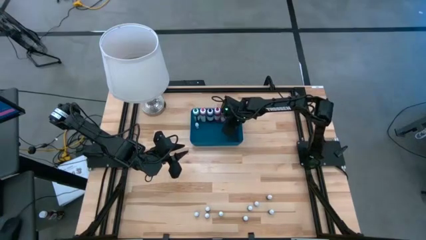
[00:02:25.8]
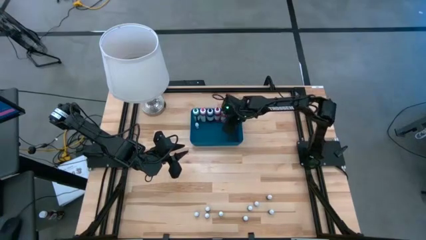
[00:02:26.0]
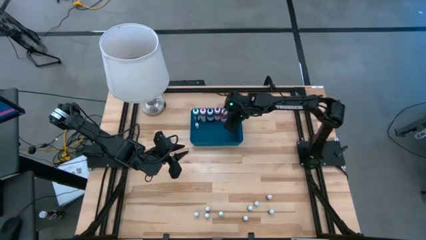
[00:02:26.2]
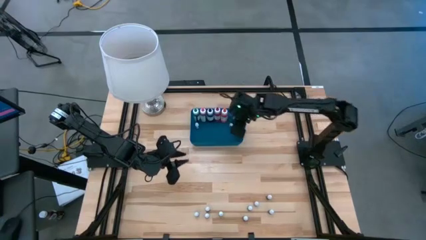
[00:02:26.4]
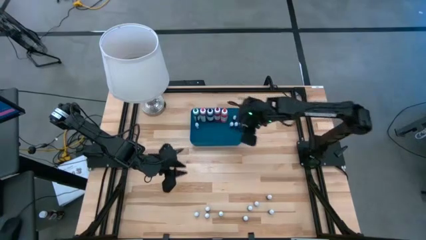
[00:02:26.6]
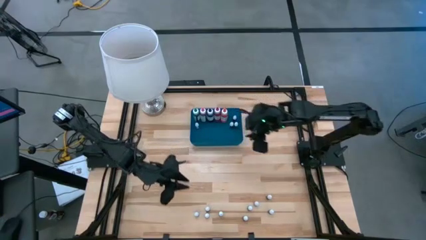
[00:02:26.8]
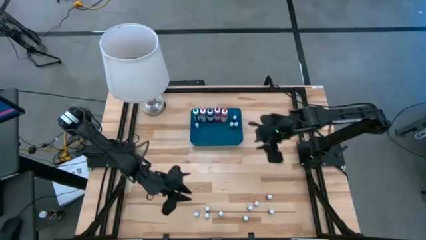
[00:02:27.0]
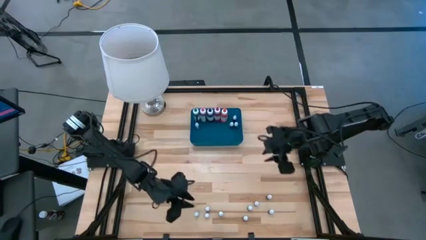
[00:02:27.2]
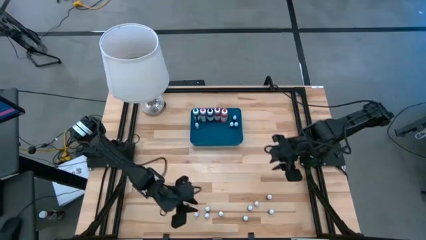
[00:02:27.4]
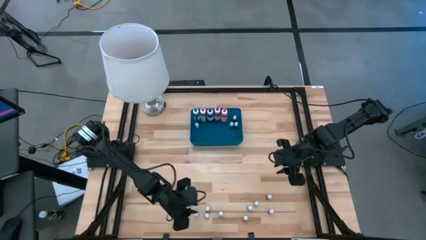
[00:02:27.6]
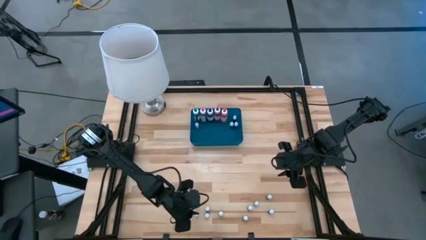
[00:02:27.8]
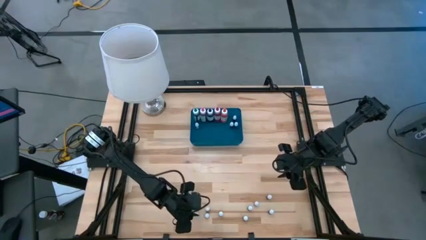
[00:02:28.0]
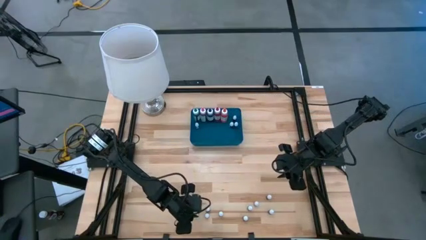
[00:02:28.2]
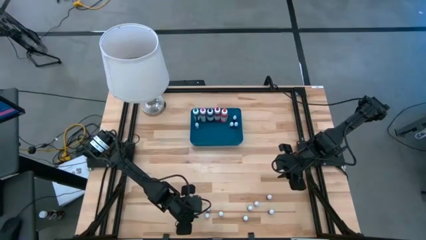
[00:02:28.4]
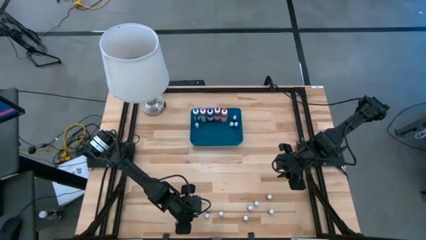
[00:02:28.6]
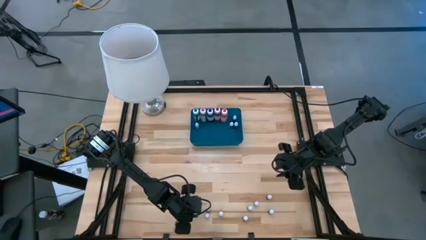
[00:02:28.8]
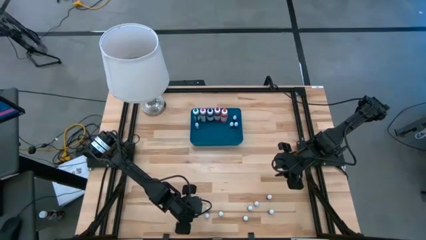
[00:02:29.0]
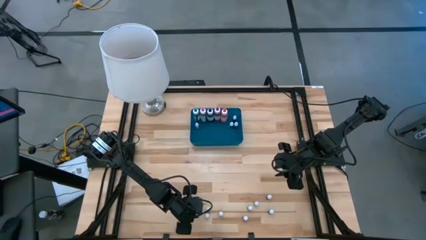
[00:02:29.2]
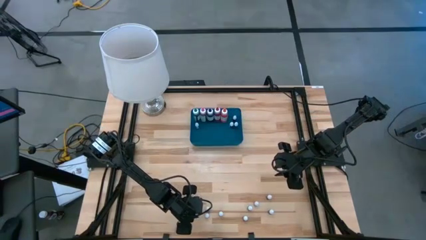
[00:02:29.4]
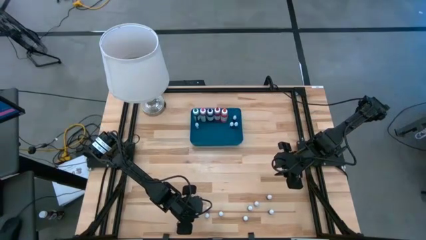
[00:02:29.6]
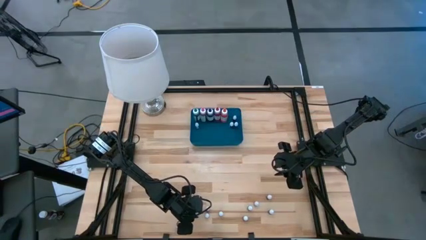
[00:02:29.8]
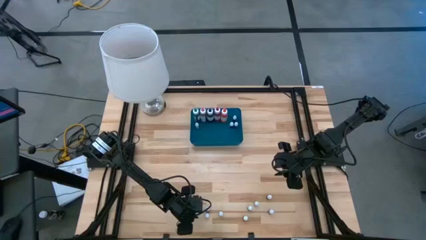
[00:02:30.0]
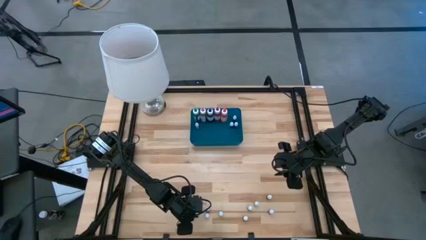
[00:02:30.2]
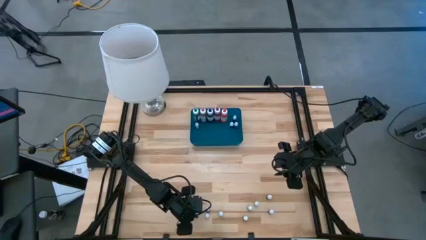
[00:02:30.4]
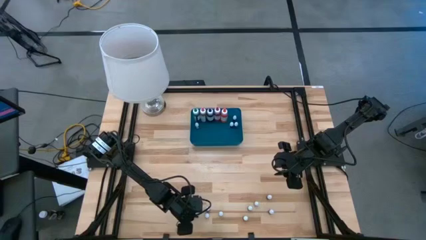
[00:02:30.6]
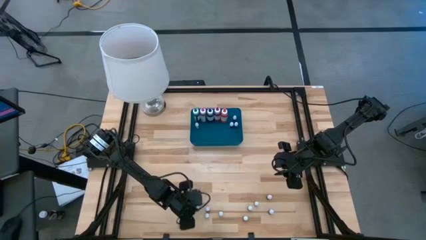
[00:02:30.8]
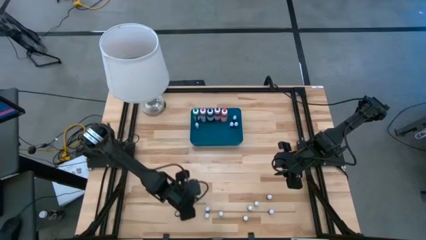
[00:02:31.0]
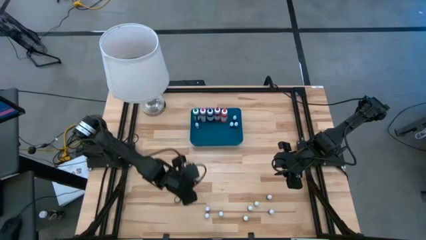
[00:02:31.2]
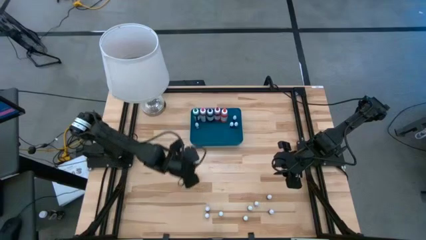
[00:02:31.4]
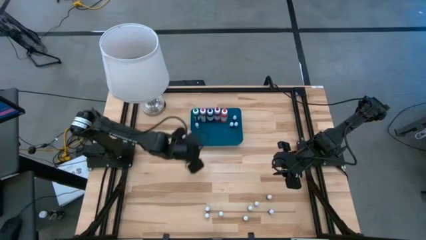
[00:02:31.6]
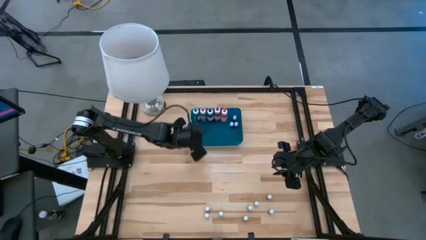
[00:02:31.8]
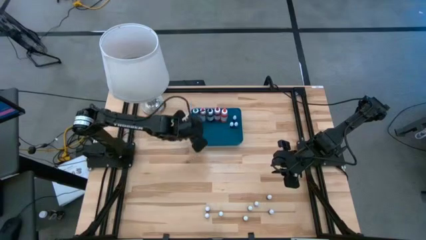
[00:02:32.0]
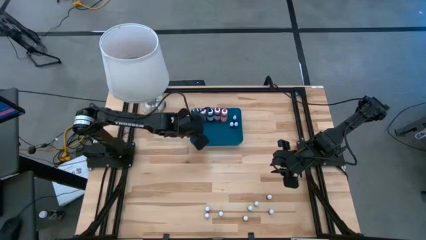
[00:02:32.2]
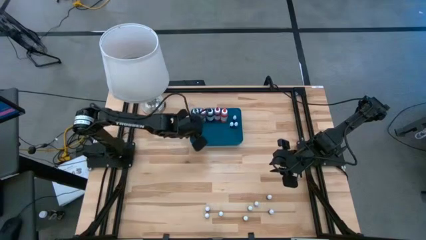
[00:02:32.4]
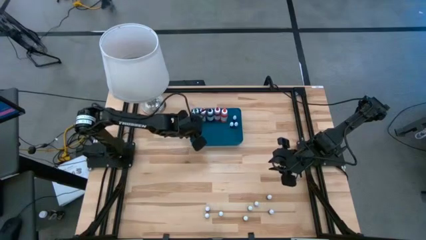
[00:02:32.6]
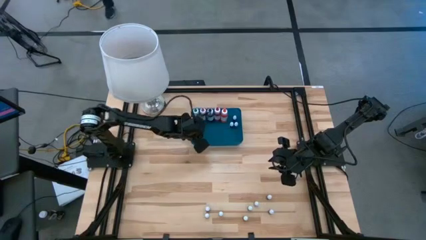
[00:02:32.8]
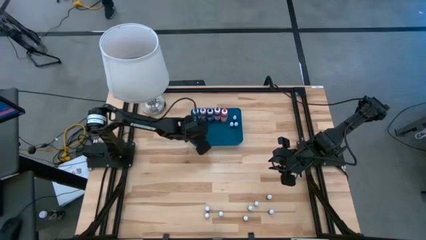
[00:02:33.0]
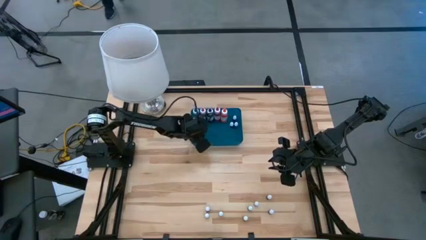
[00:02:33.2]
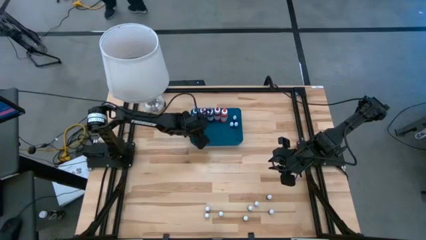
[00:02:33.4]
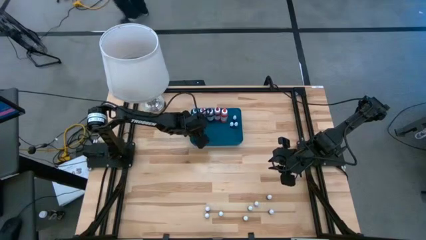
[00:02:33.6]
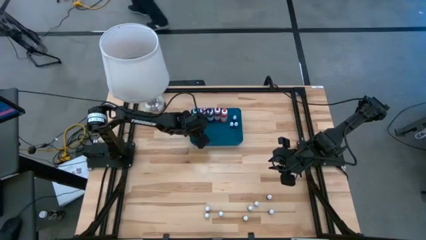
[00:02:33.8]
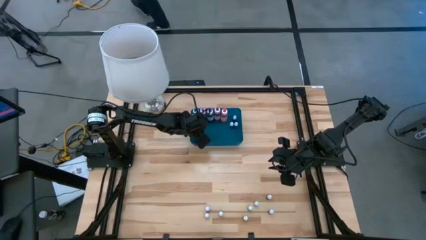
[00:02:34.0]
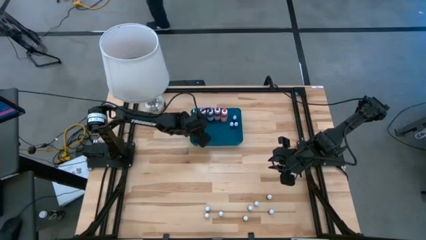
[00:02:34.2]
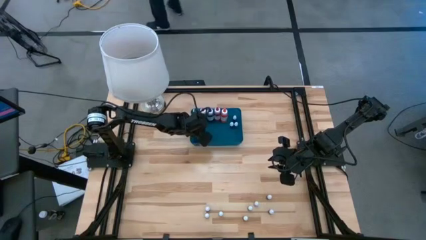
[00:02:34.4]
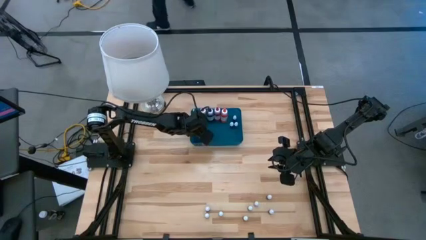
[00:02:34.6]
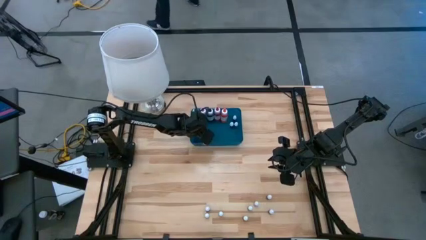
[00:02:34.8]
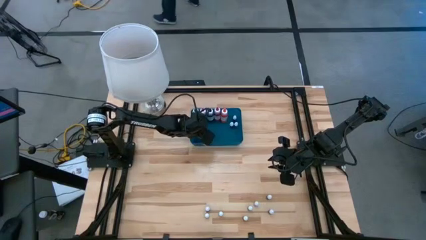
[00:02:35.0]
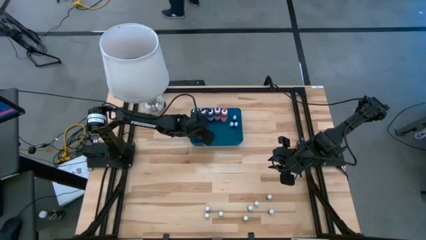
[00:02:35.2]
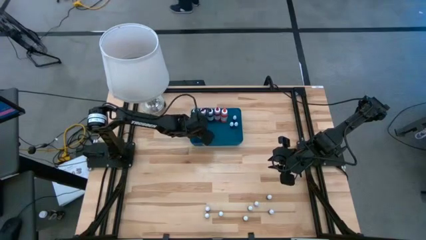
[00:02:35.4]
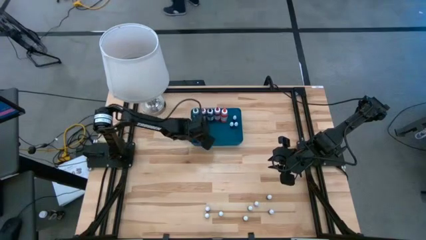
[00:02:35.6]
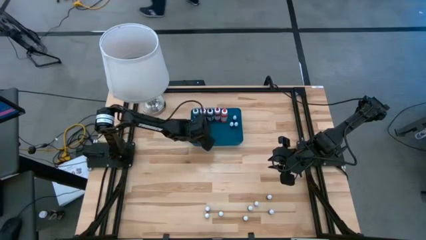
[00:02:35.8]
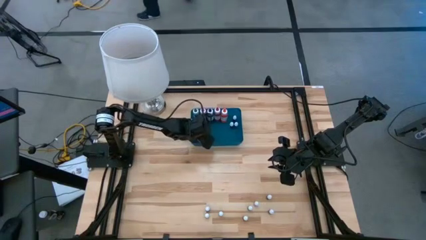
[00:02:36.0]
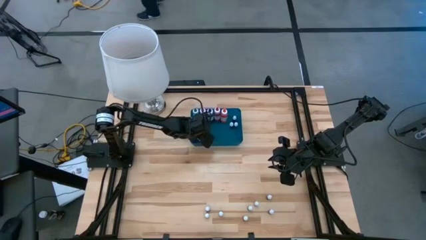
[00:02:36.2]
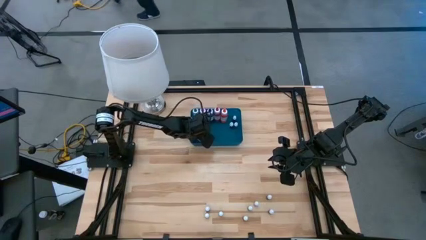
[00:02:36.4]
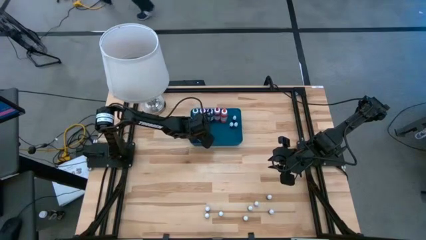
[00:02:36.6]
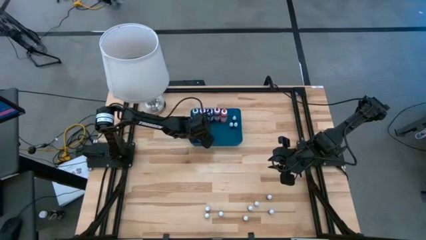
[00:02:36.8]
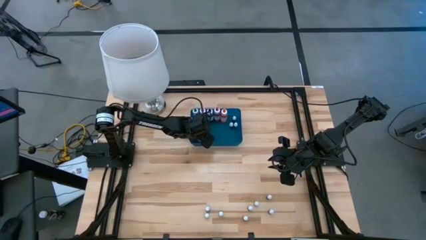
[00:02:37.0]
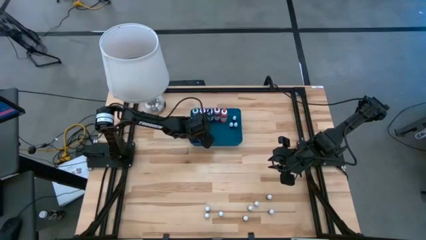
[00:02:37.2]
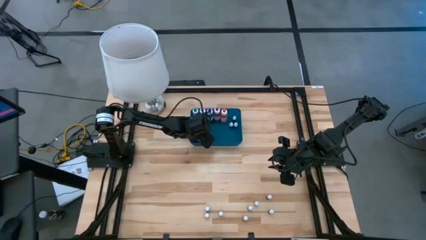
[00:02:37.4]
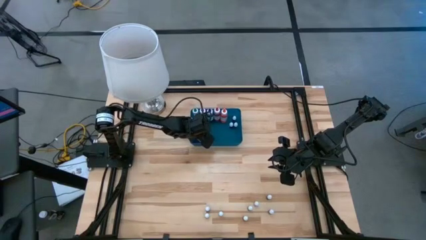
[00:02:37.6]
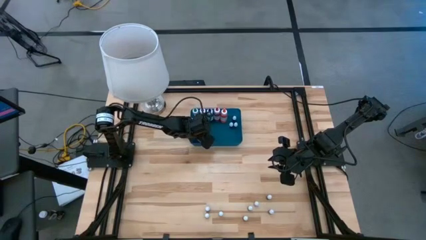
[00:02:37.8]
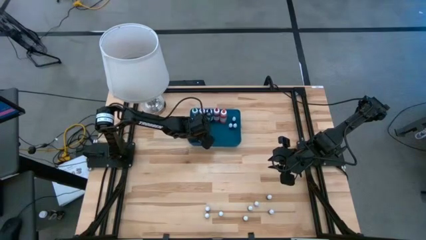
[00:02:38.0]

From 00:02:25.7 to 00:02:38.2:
Task: Pick & Place food coloring
Put the small black food coloring bottle into the bin
